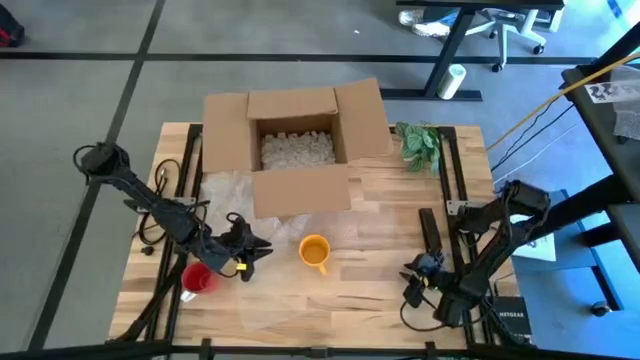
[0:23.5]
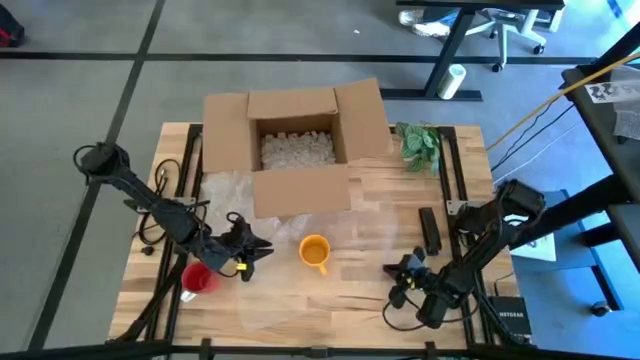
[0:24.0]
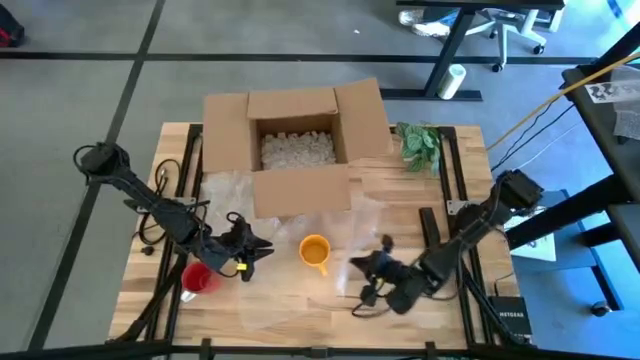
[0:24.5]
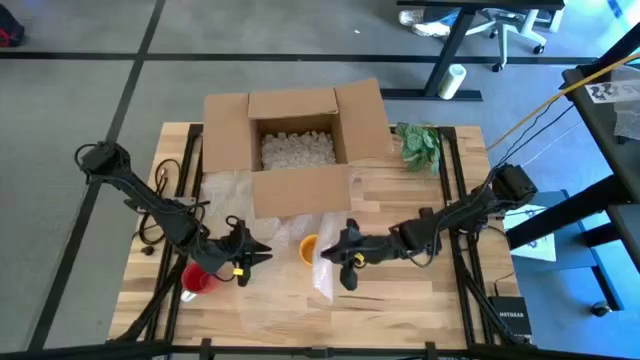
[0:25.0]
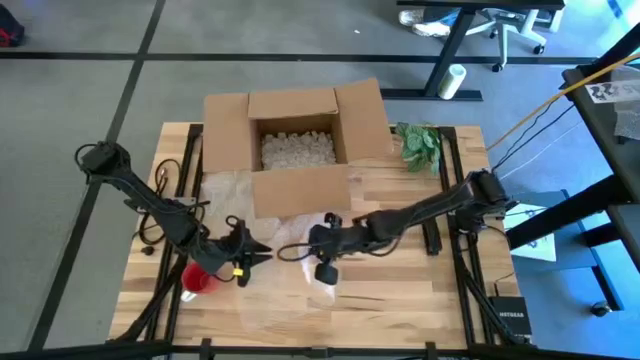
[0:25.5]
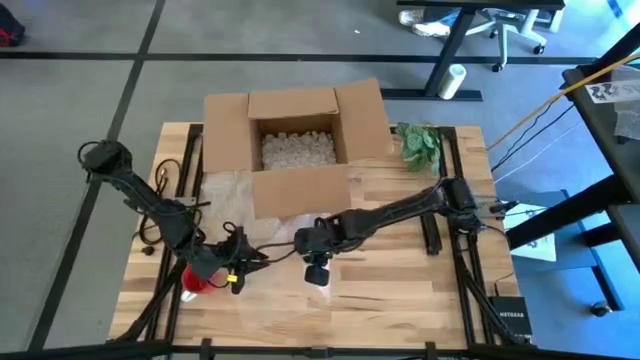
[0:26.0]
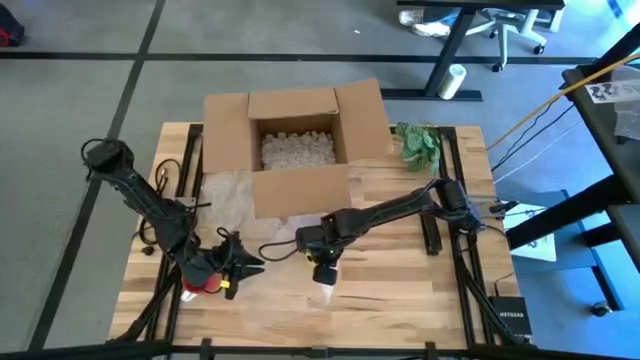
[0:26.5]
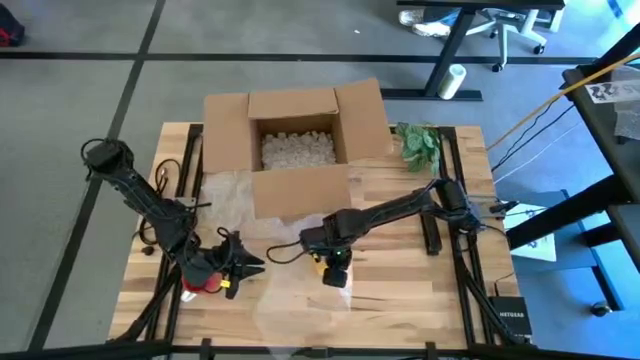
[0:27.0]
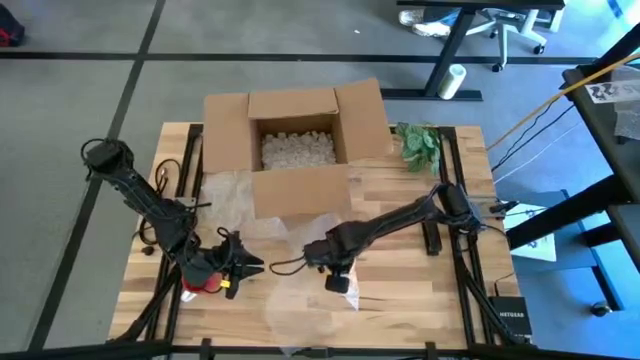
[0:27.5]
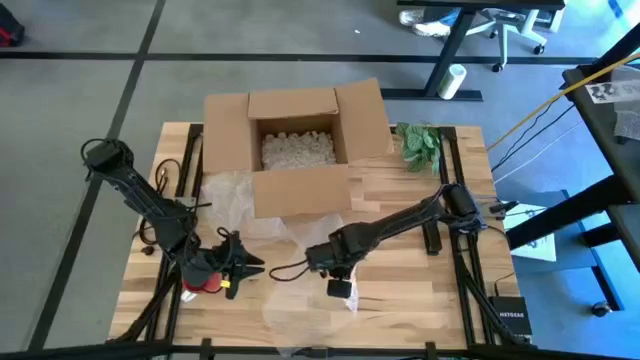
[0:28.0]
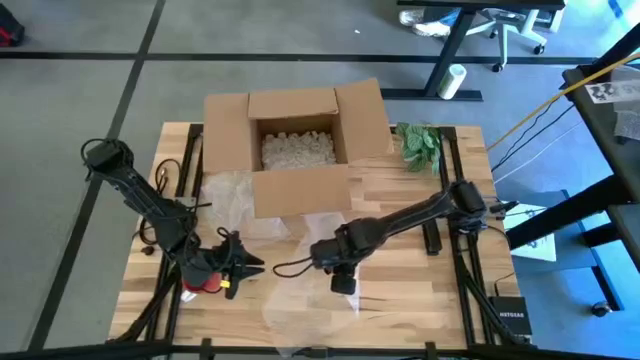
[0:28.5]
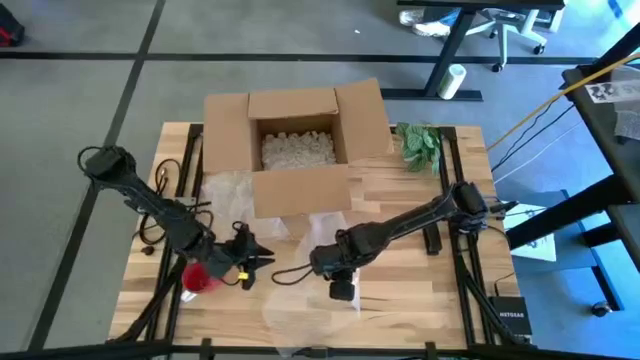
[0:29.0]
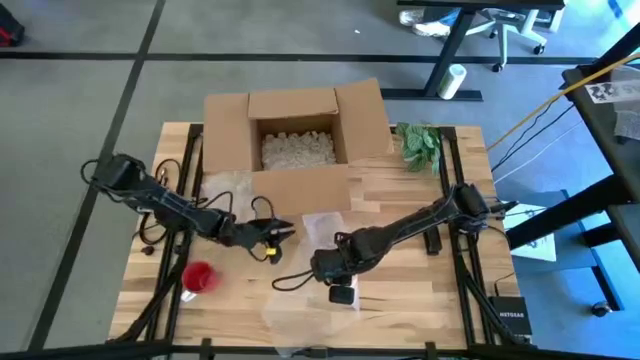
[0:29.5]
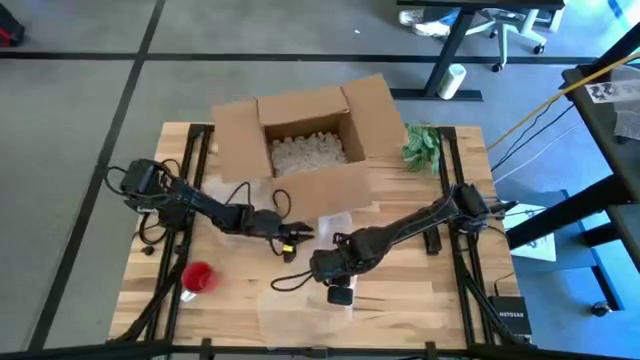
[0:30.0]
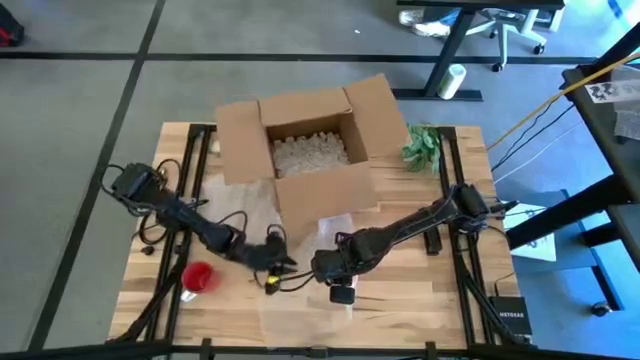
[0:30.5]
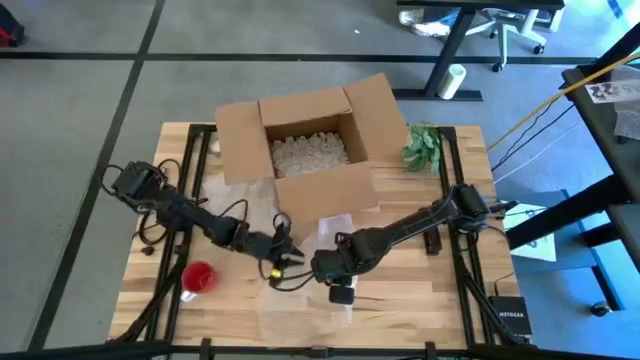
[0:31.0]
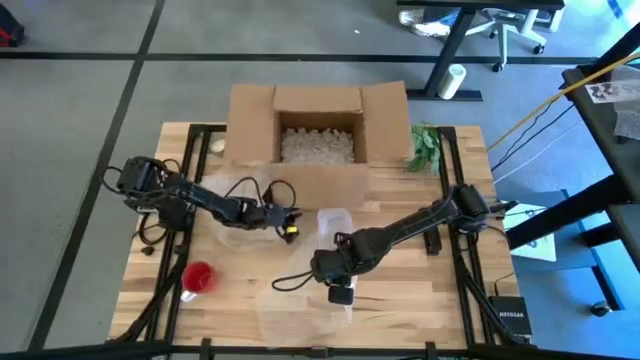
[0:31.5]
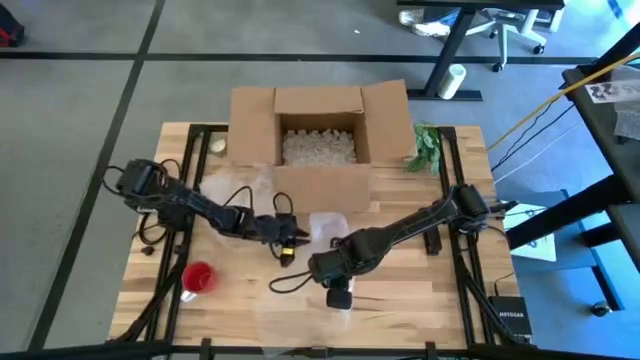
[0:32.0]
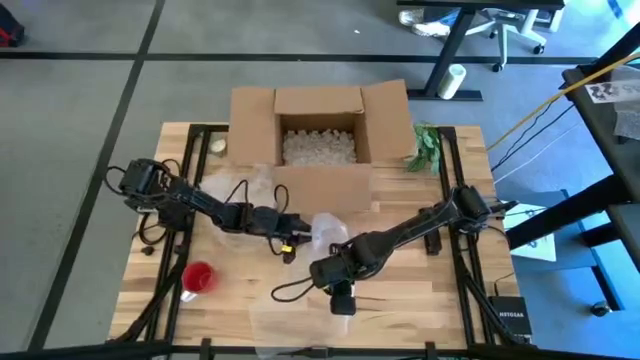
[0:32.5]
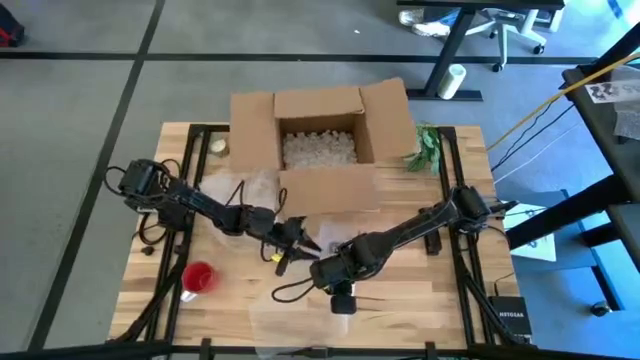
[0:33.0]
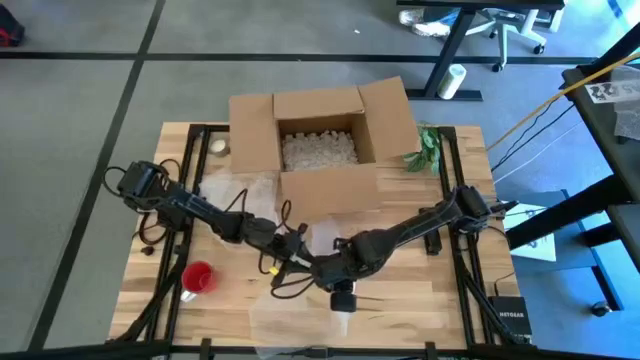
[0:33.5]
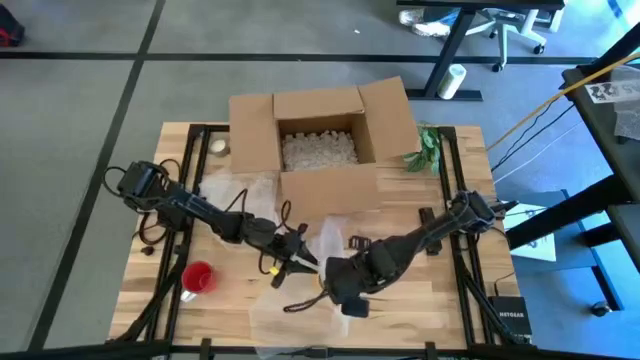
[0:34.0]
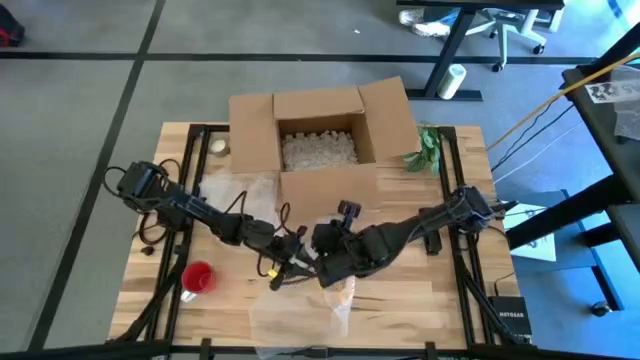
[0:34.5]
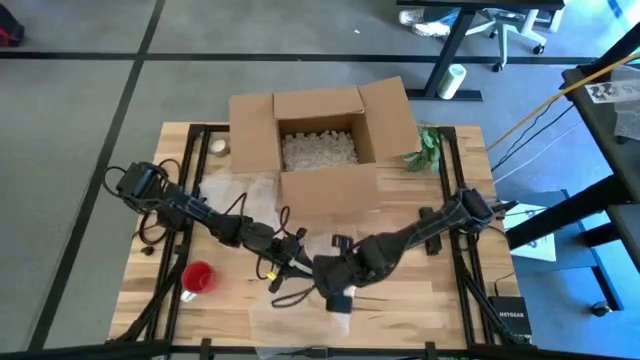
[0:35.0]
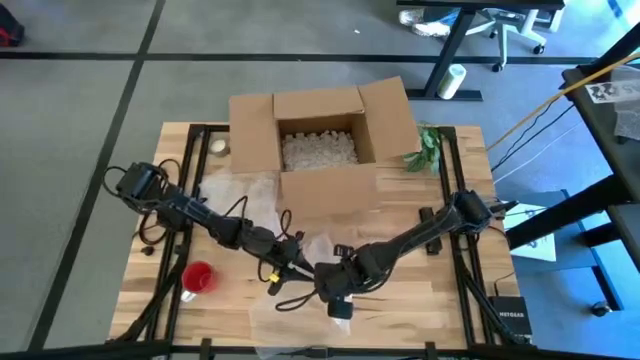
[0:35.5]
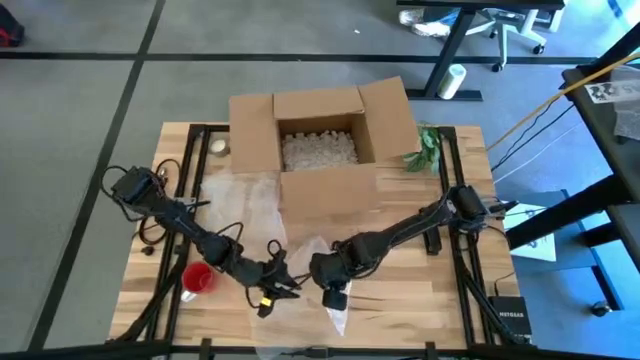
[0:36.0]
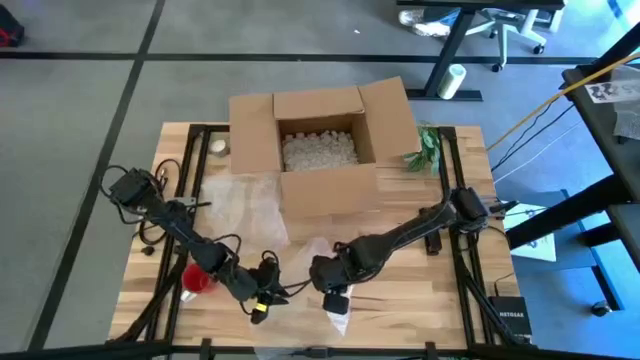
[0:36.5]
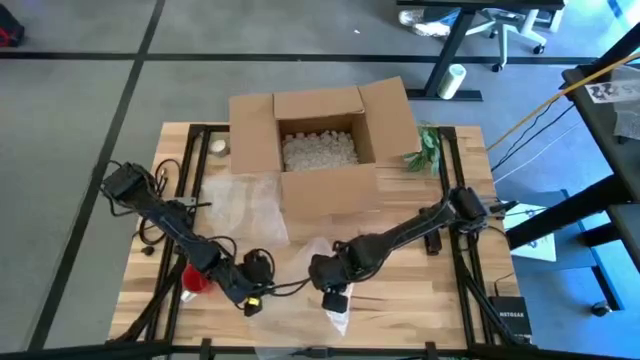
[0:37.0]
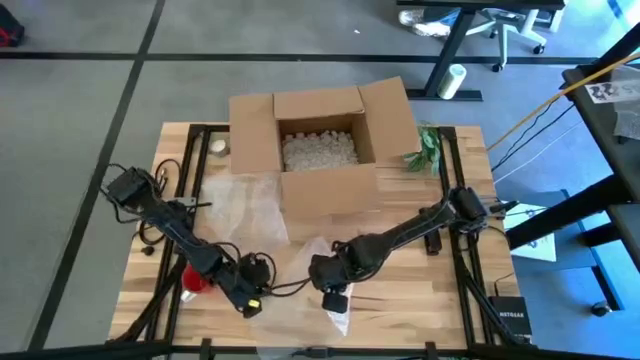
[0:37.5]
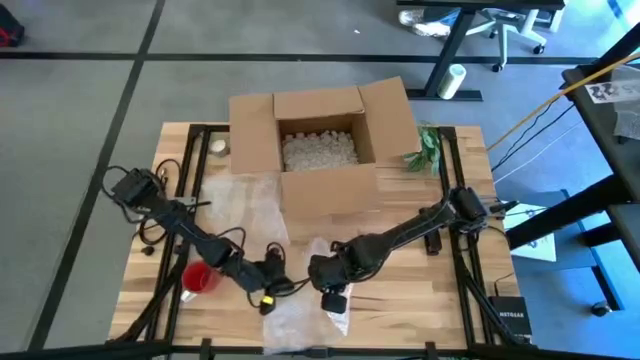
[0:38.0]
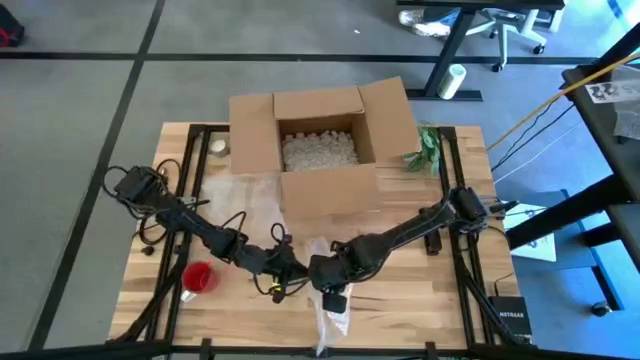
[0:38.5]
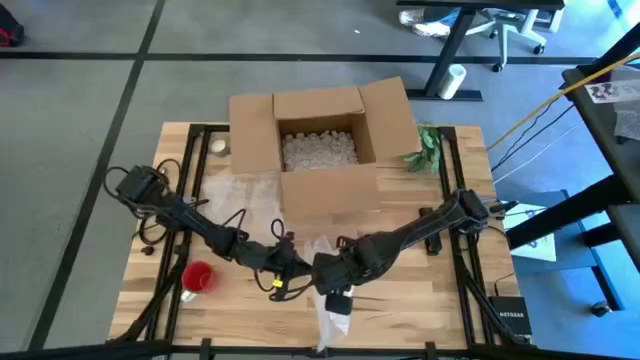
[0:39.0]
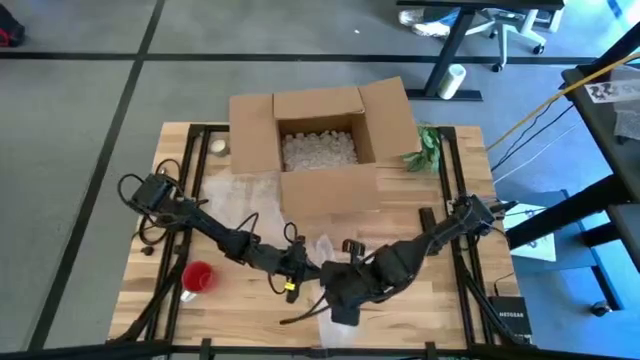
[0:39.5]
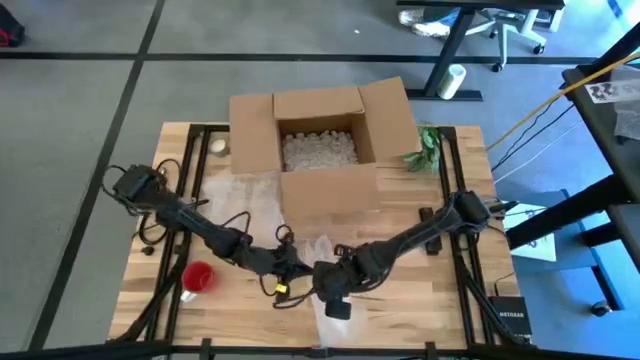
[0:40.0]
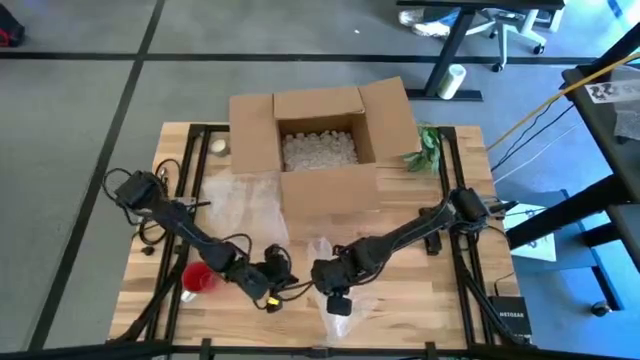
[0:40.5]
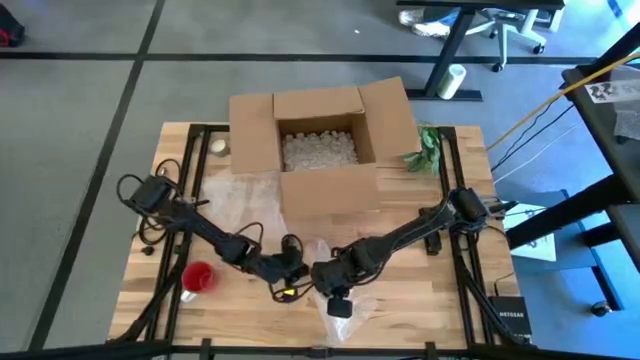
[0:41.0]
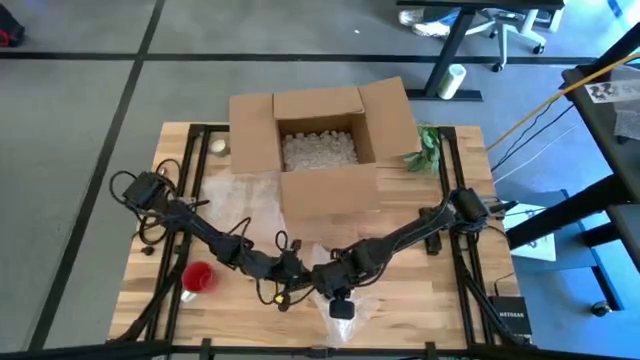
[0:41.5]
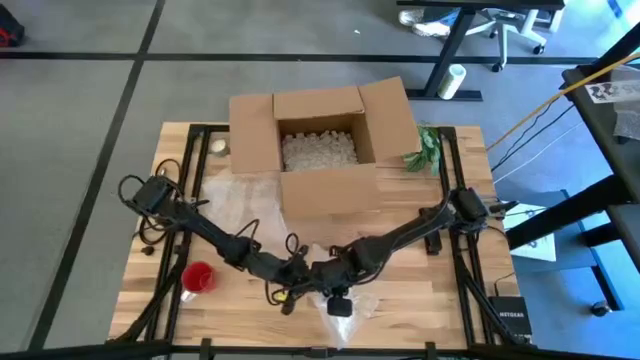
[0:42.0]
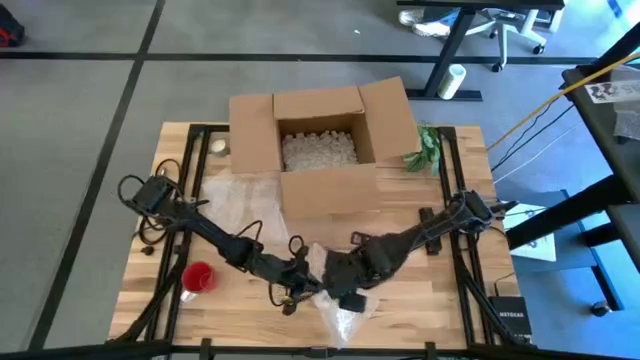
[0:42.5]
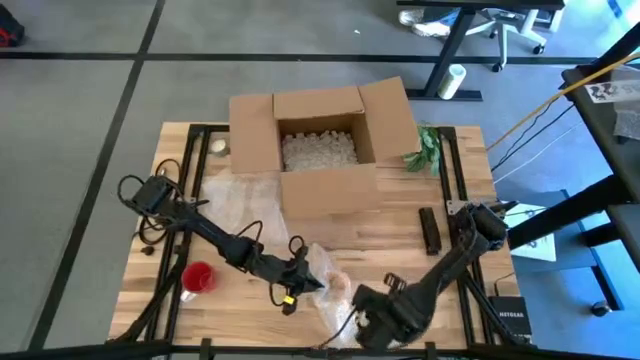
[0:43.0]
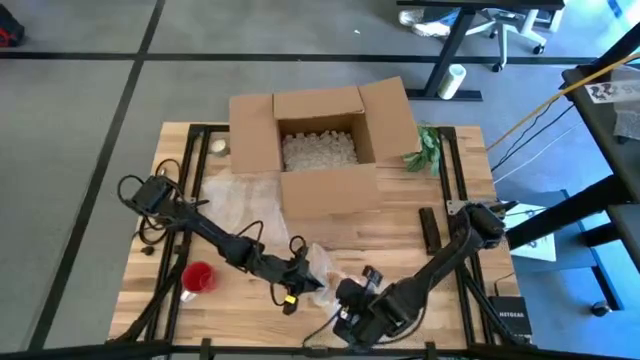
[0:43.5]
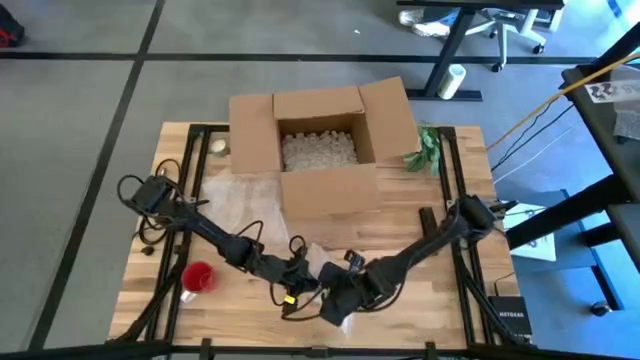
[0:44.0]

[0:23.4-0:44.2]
Task: wrap mug
Wrap the yellow mug with the right transparent bubble wrap

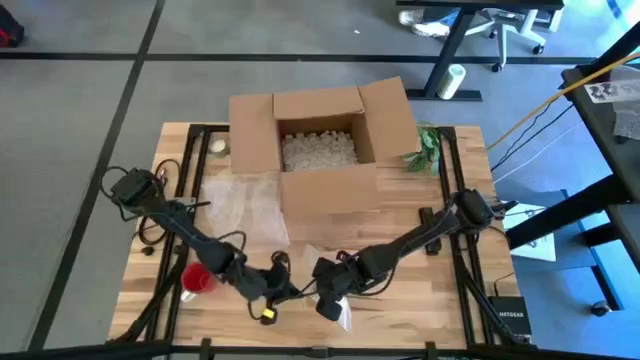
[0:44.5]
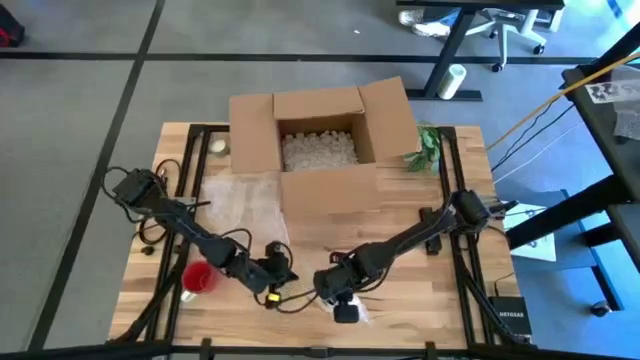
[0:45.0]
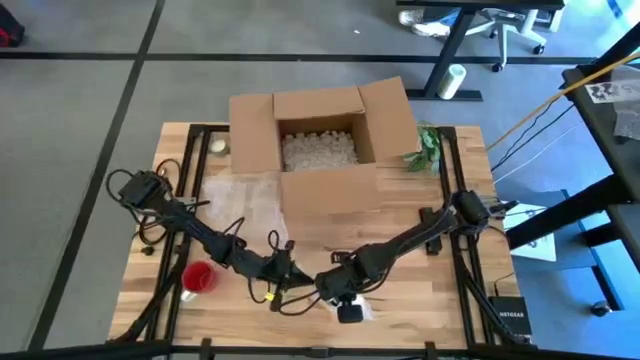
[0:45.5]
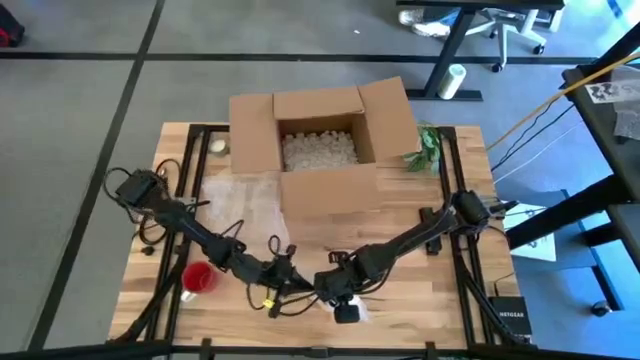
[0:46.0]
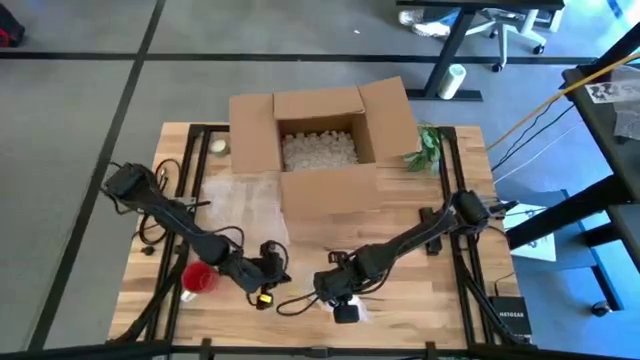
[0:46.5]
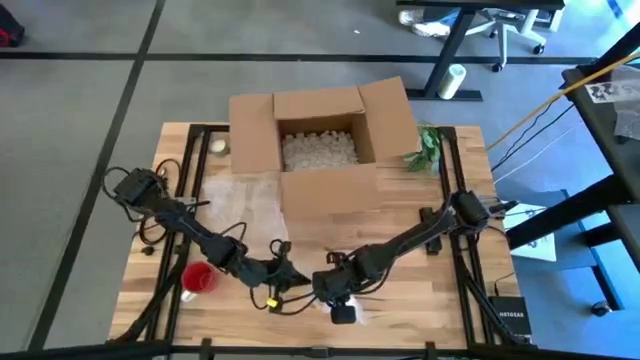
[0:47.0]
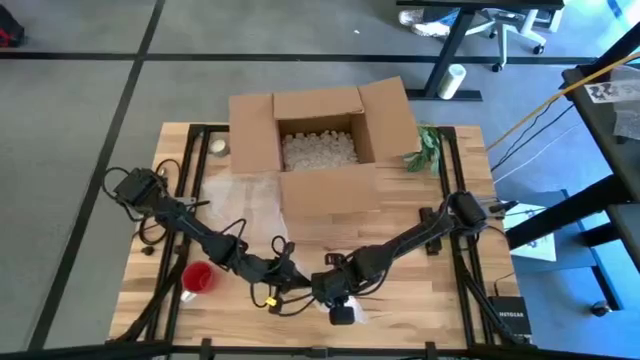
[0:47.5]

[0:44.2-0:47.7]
Wrap the yellow mug with the right transparent bubble wrap
